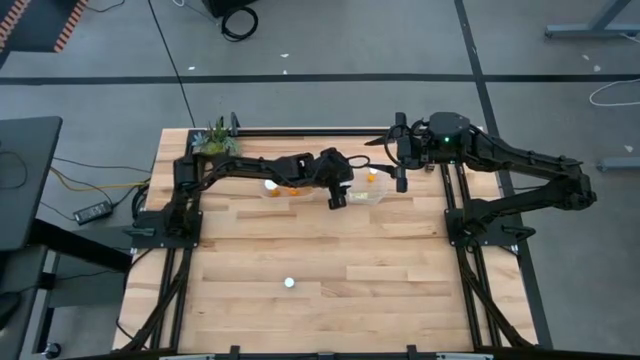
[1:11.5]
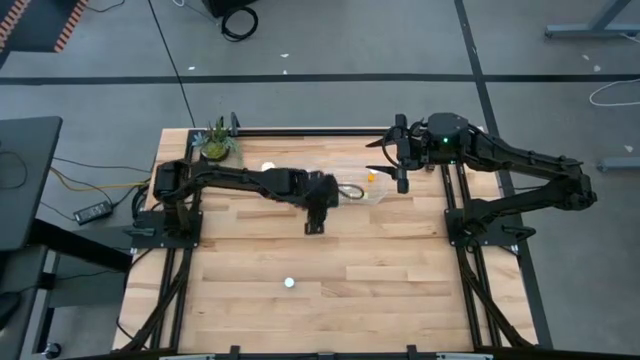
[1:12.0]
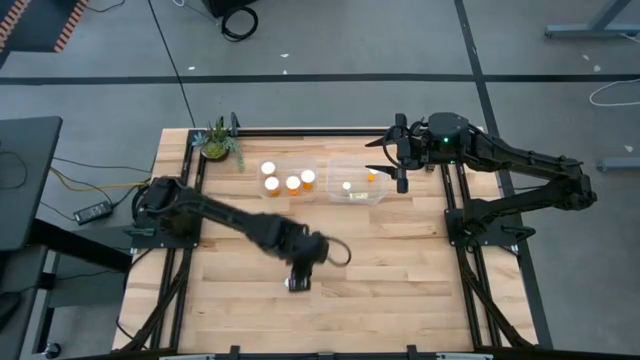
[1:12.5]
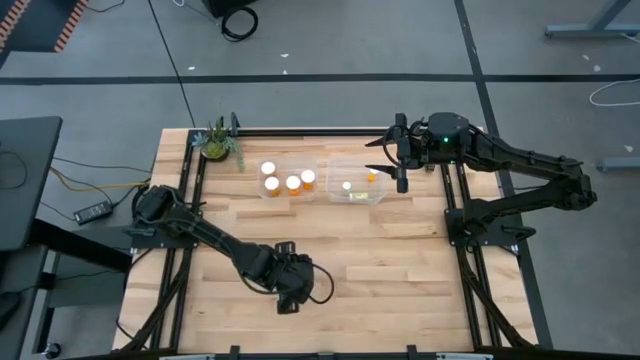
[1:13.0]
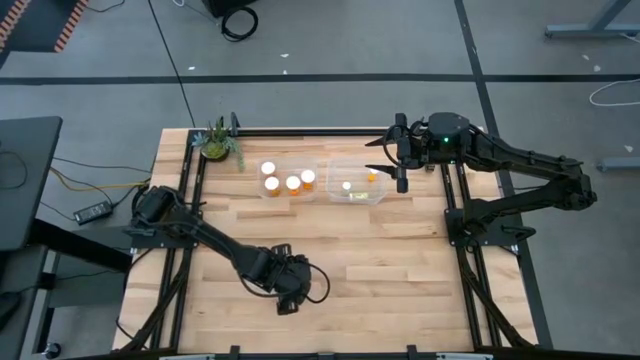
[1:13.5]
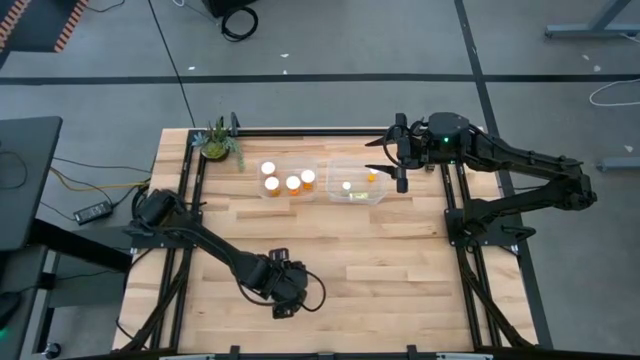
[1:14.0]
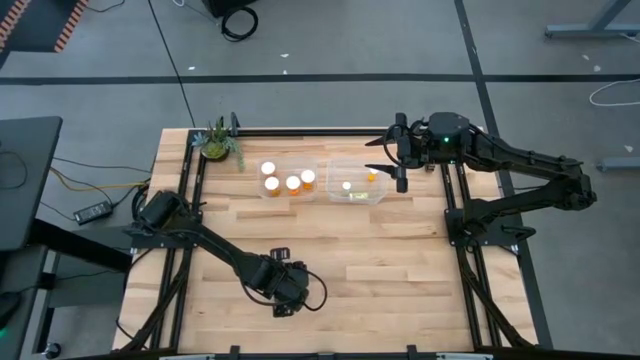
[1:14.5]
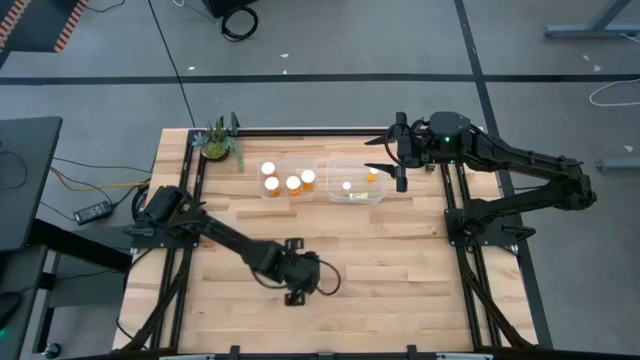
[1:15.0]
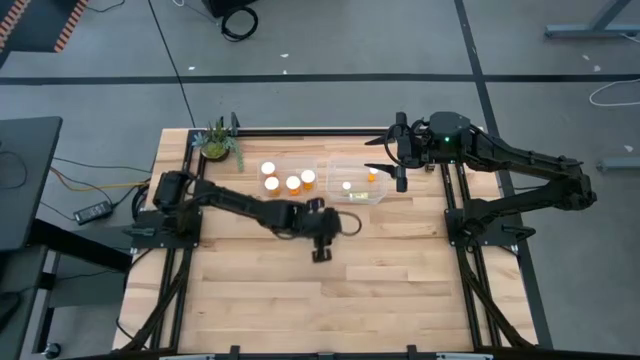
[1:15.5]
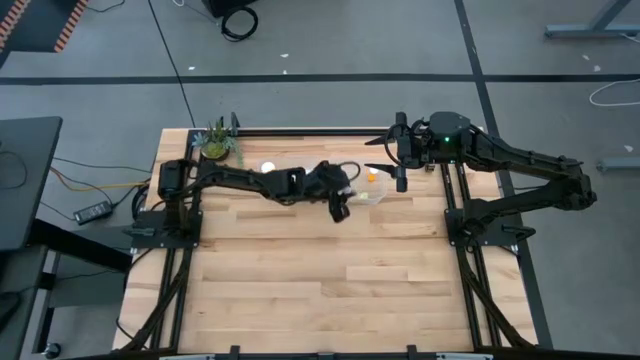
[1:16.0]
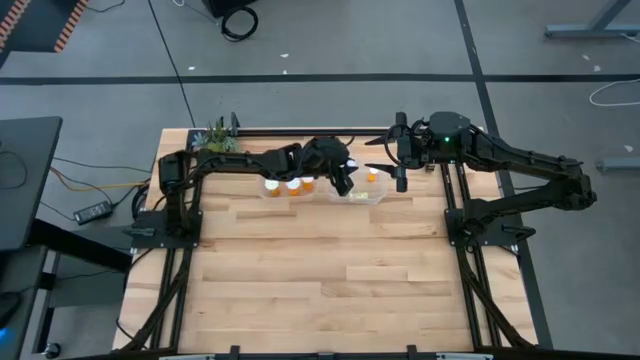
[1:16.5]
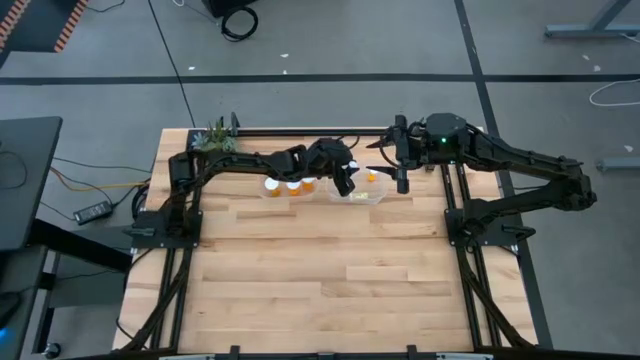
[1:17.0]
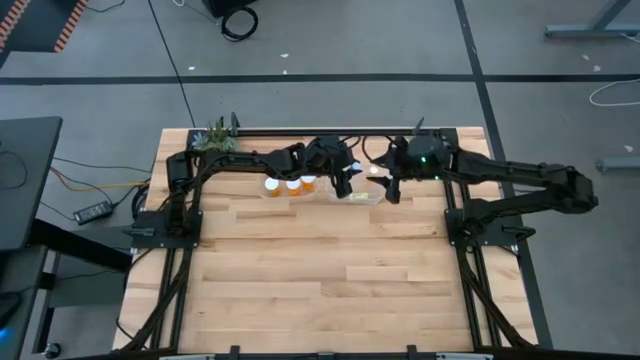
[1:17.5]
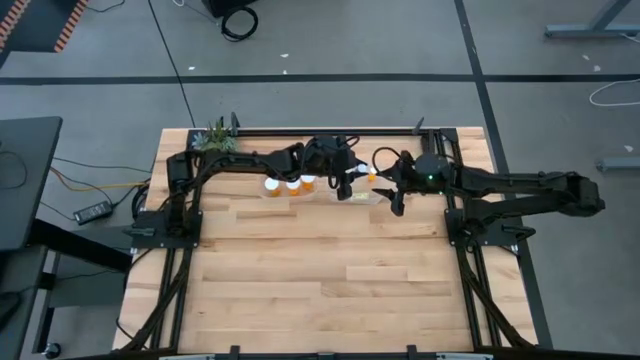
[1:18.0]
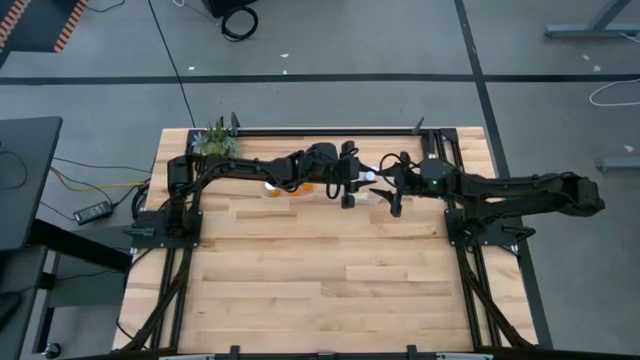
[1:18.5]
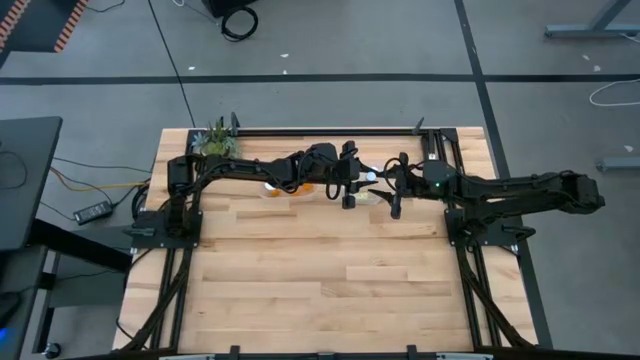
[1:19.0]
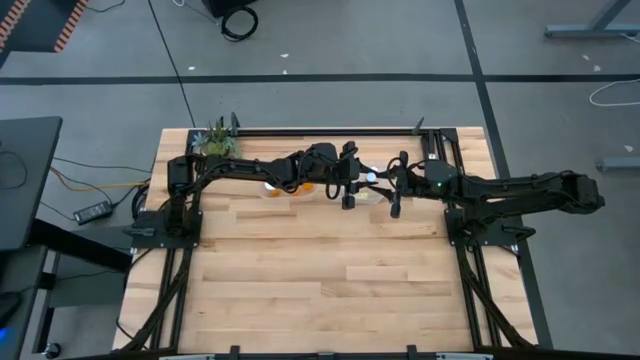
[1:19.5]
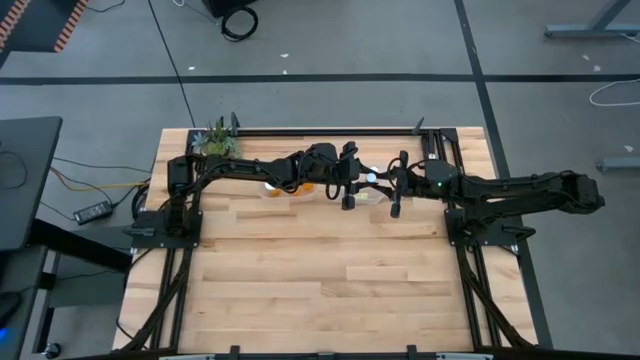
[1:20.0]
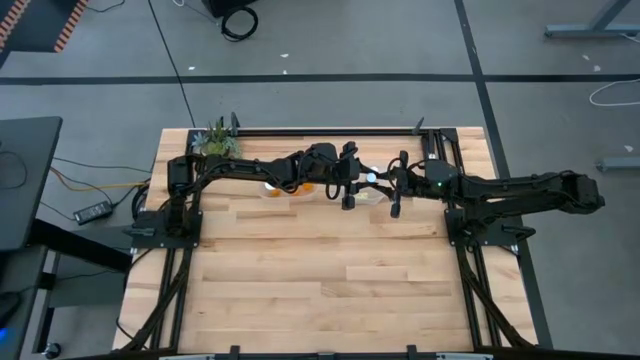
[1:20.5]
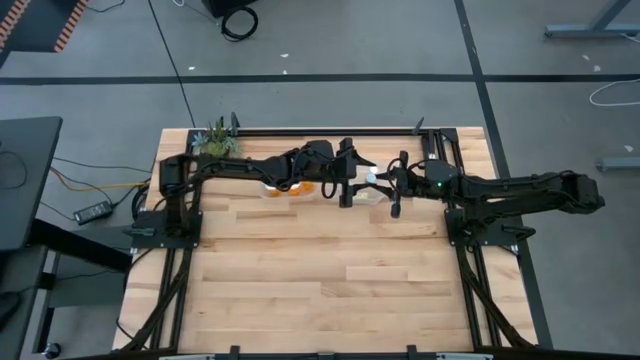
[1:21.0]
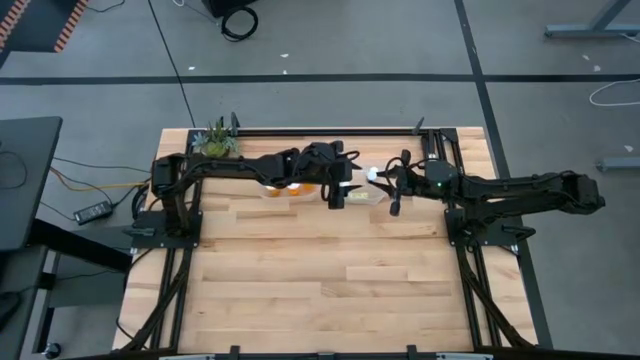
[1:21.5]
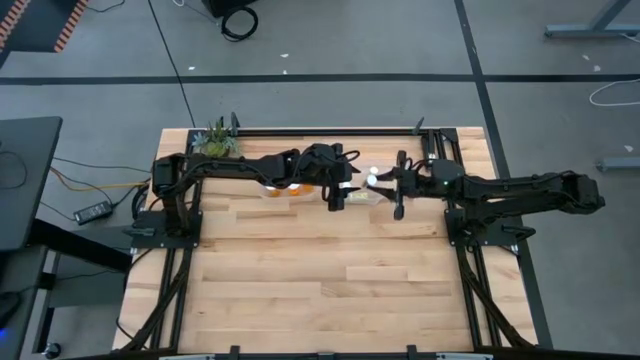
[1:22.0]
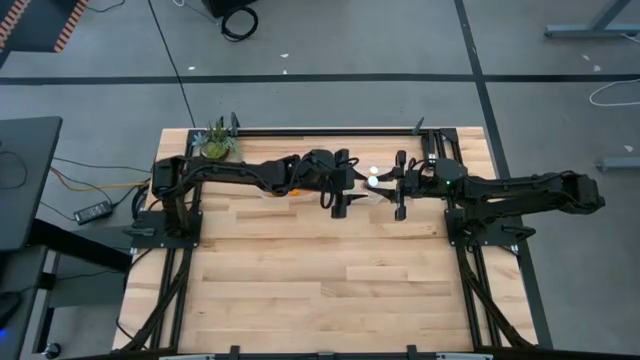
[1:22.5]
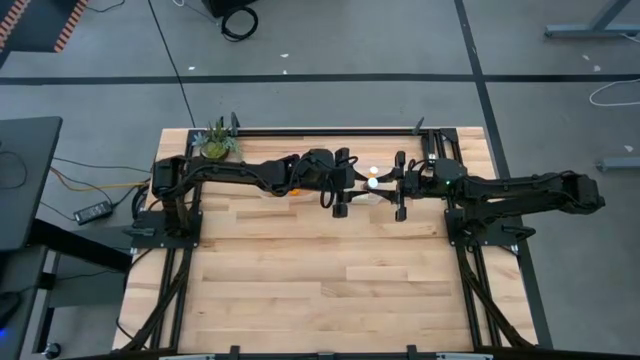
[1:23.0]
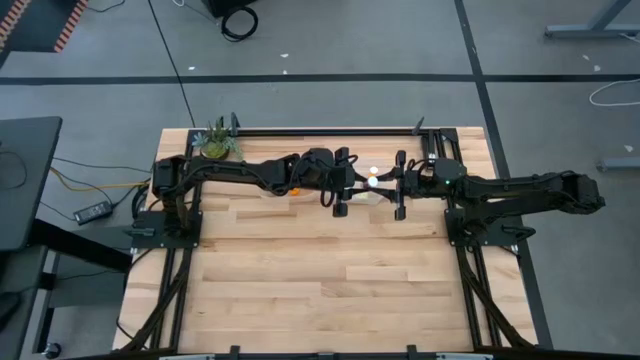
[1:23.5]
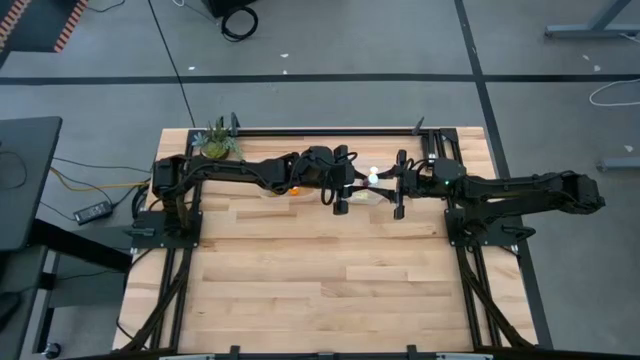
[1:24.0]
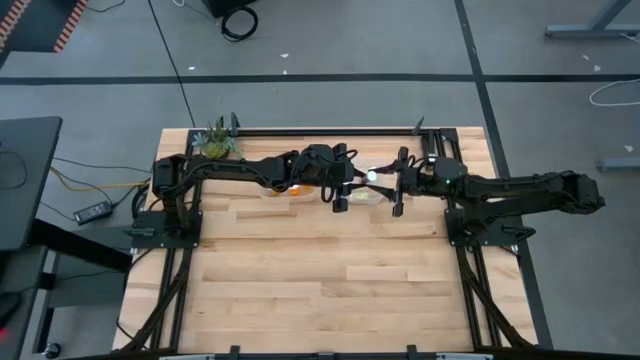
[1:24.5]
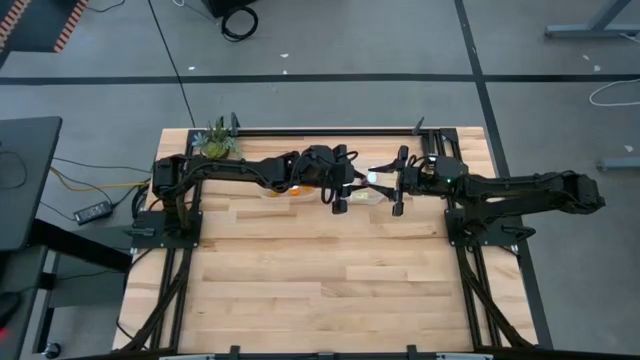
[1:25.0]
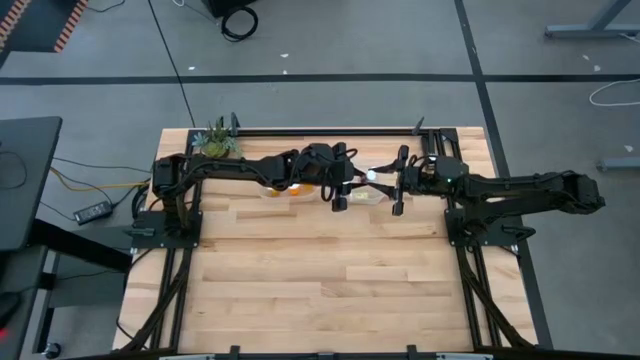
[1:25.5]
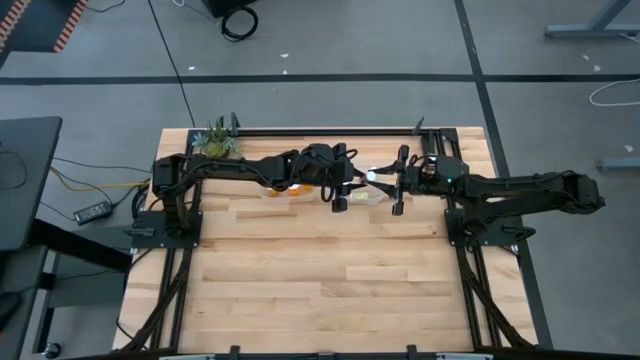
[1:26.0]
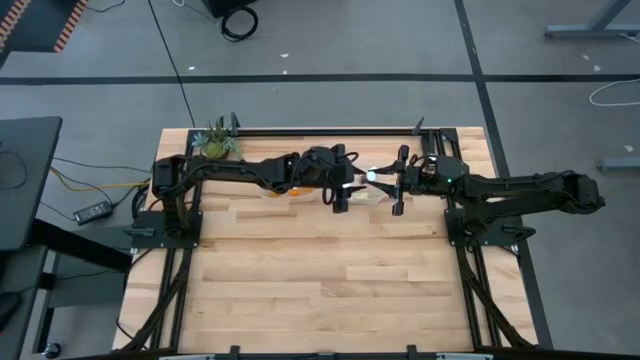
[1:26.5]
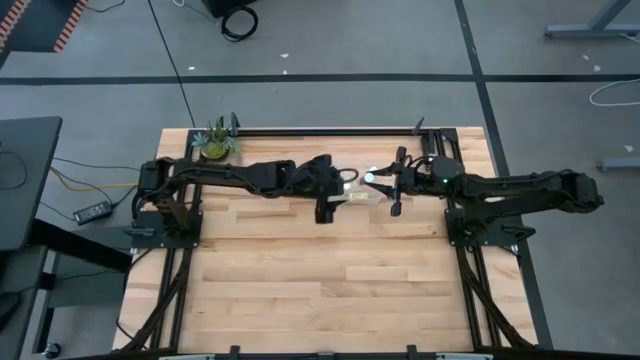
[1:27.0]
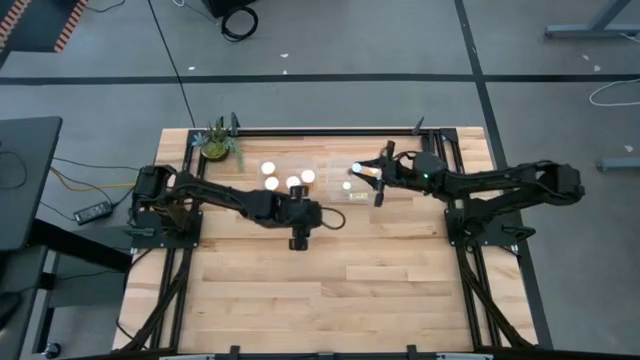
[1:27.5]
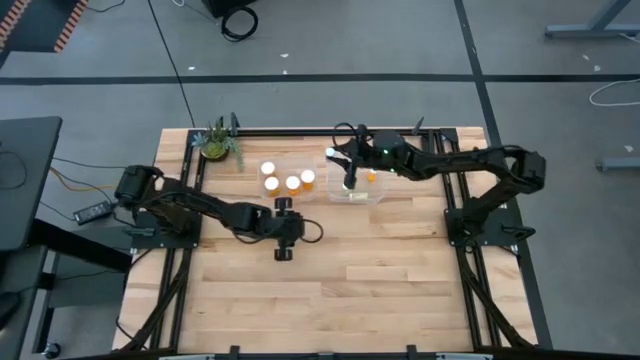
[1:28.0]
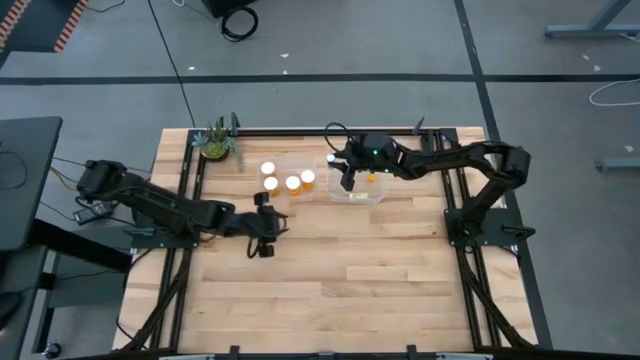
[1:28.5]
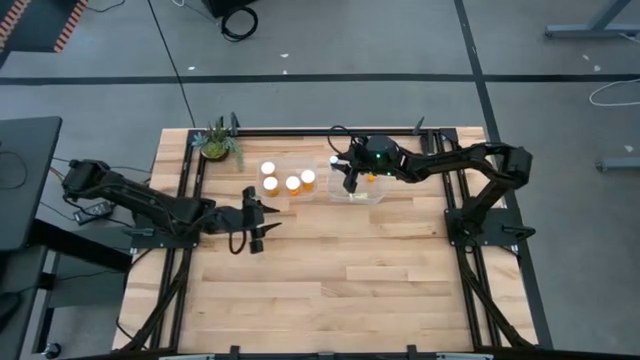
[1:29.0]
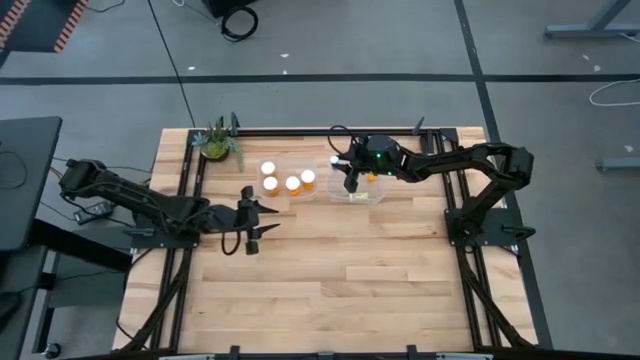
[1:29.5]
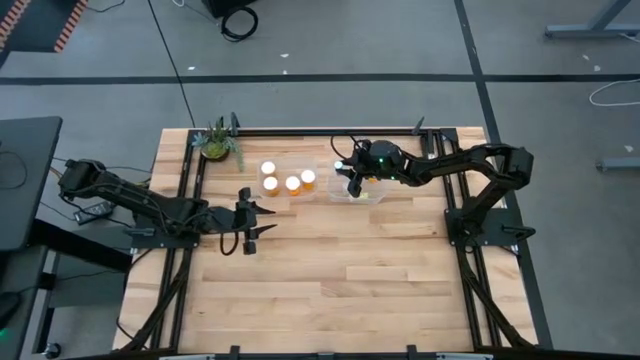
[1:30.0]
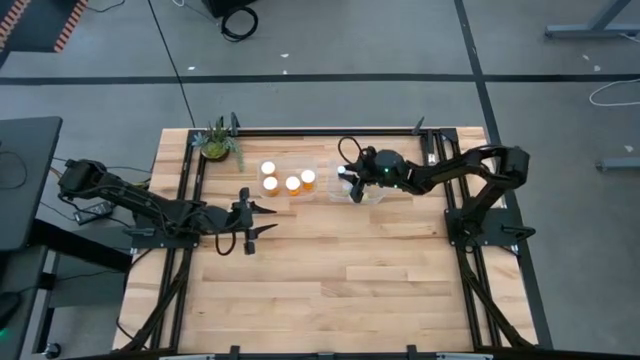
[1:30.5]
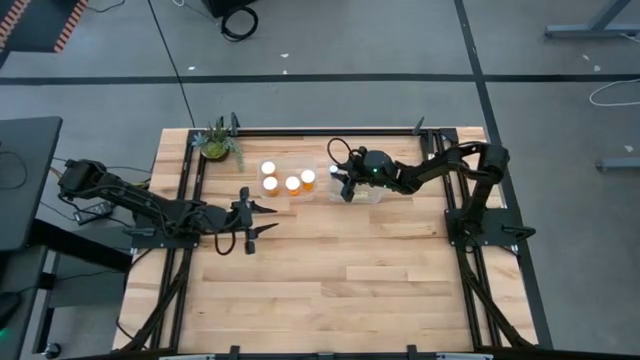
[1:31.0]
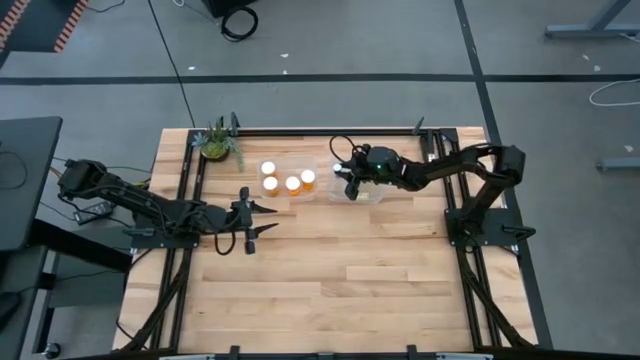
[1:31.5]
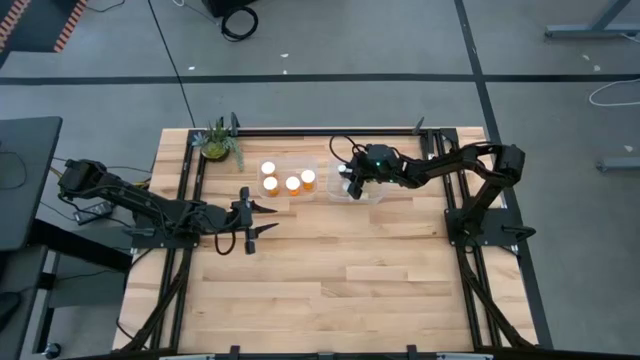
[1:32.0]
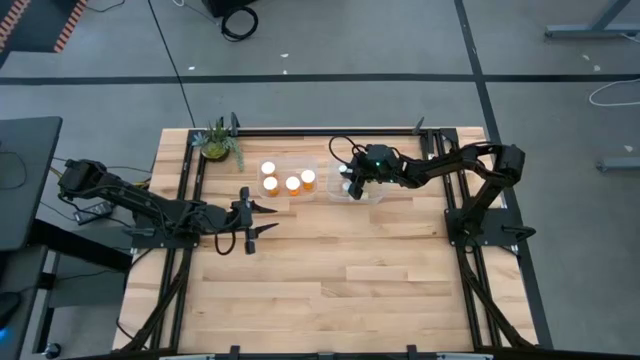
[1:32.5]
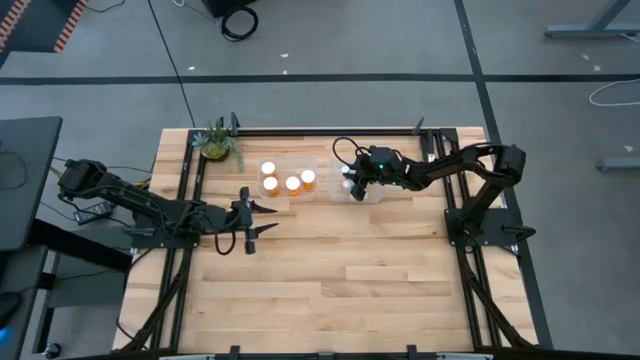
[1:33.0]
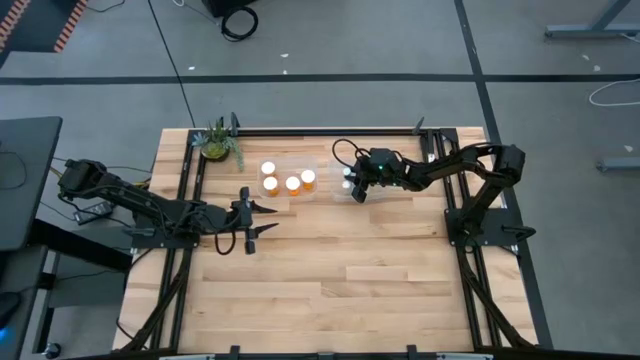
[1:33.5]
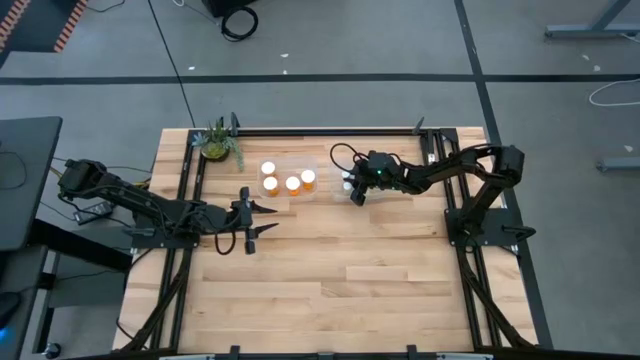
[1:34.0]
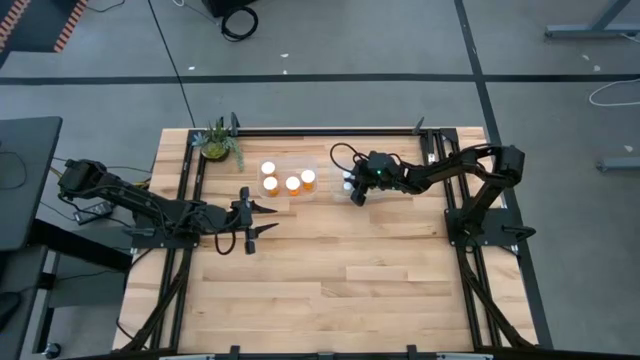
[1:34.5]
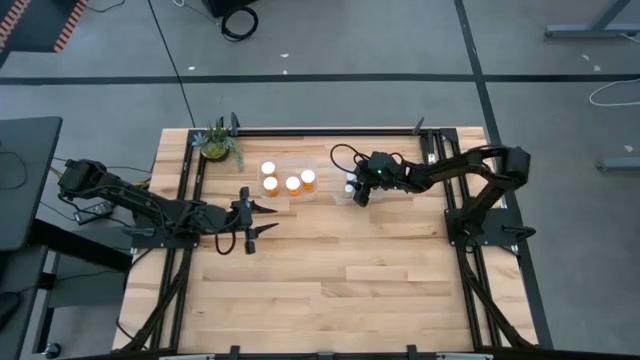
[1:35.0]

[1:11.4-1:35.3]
Task: Pick and place medicine bottles into bin by pill shape (circle, oval)
Put the small blue pill bottle into the right transparent bin
